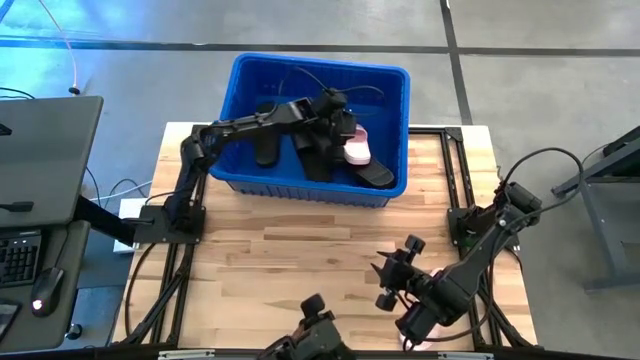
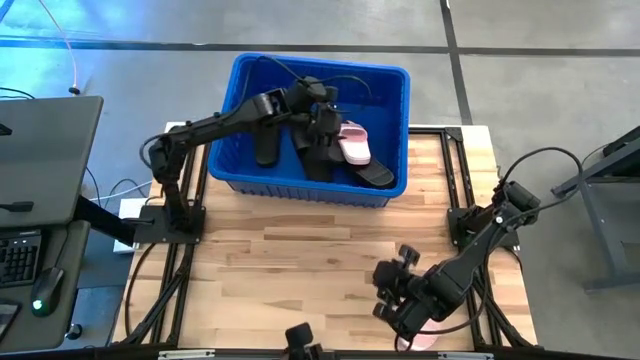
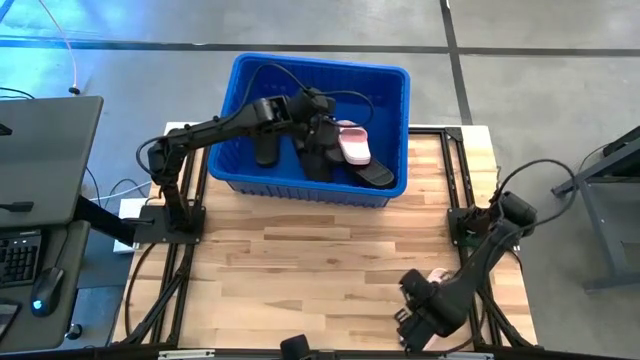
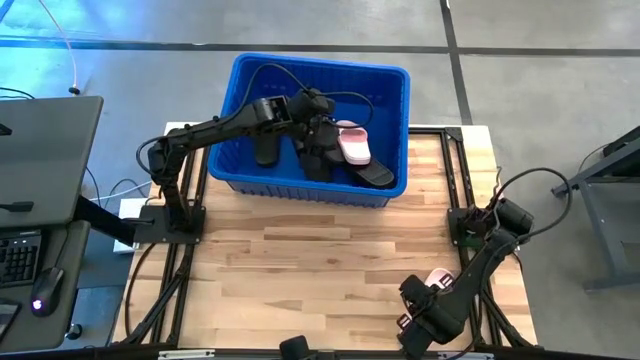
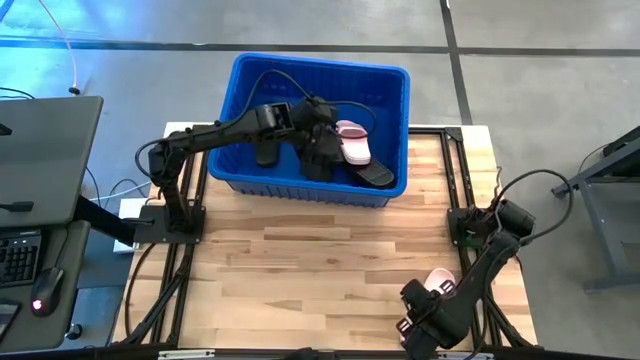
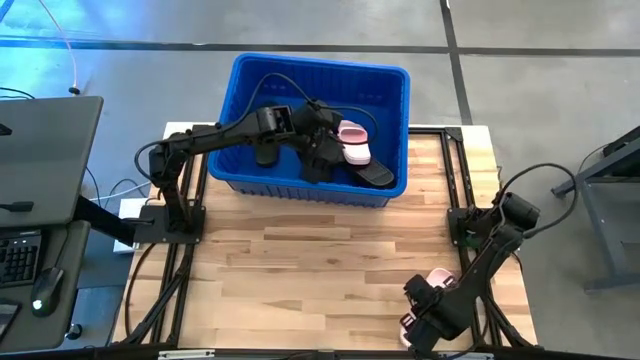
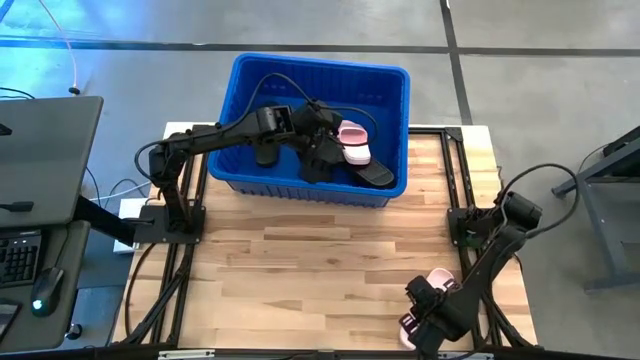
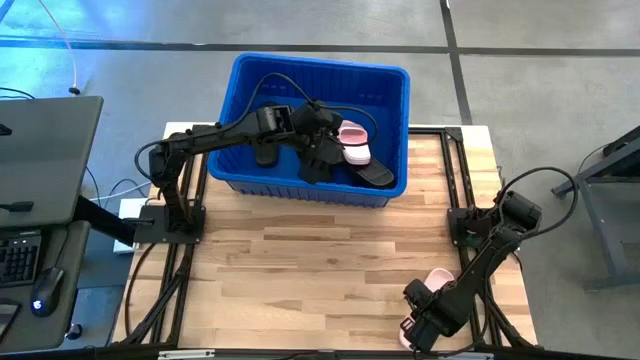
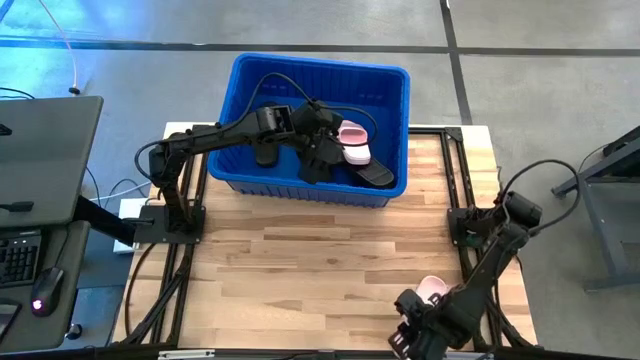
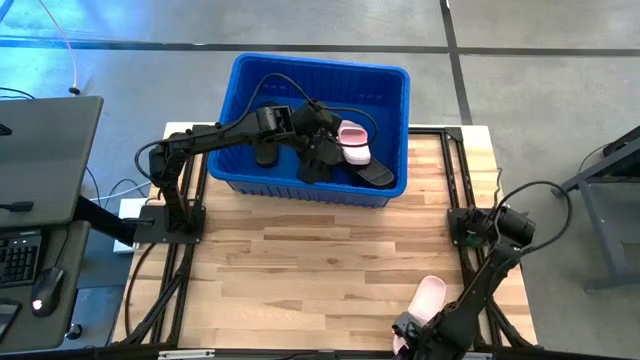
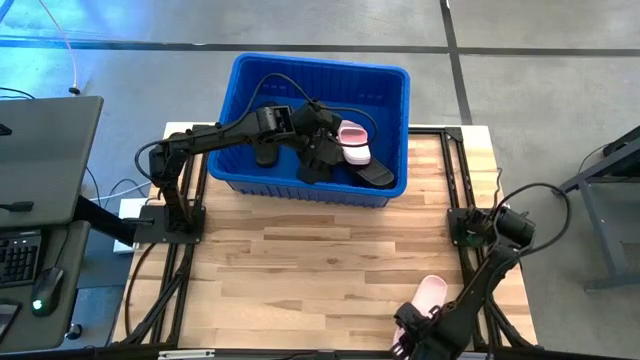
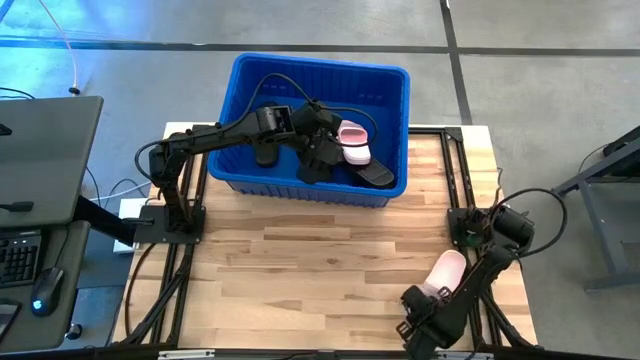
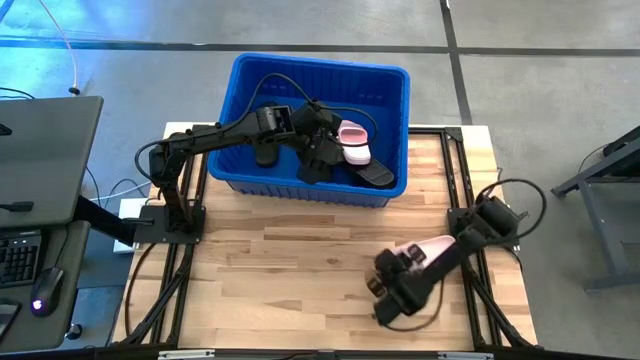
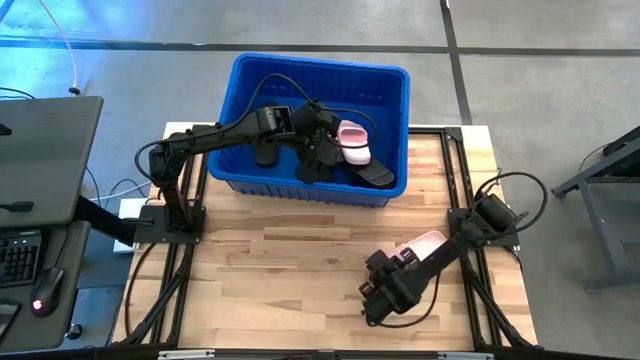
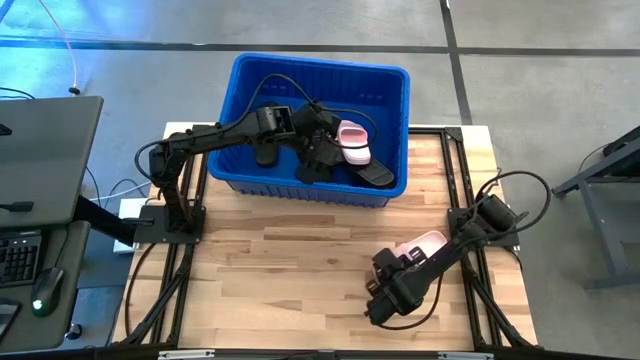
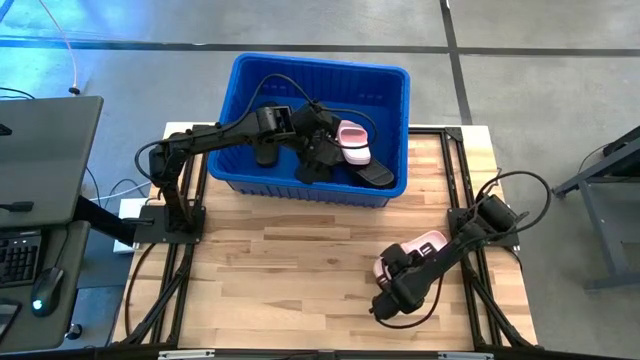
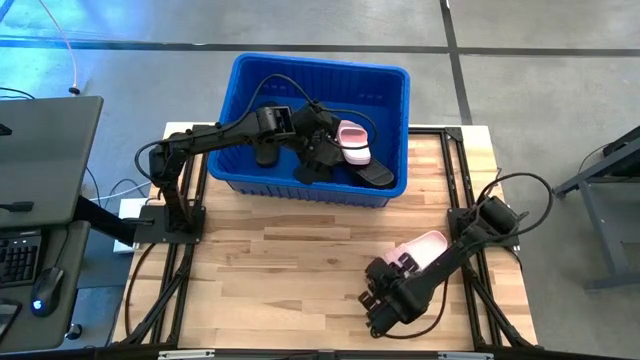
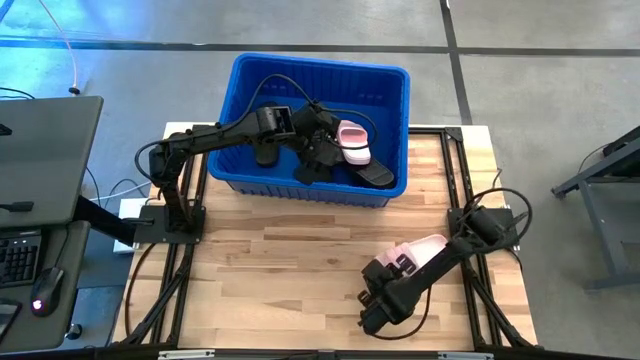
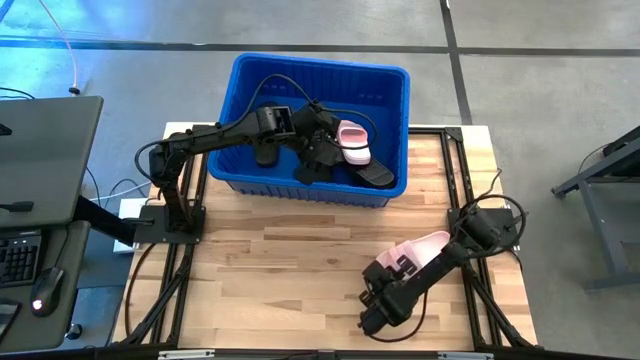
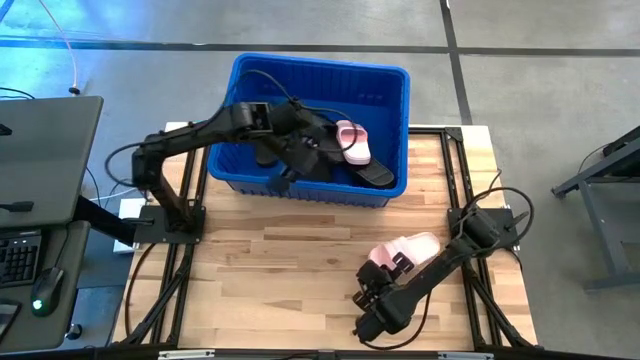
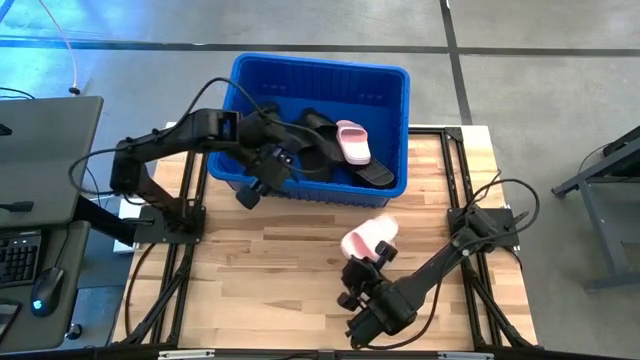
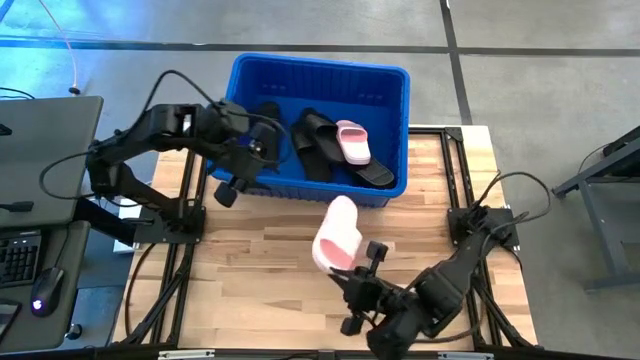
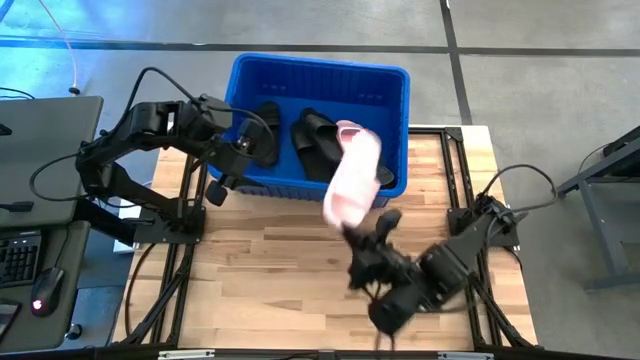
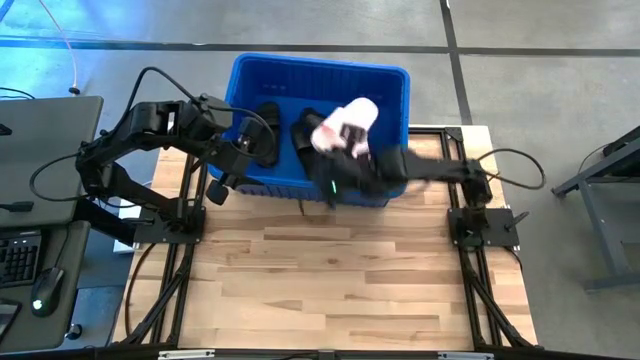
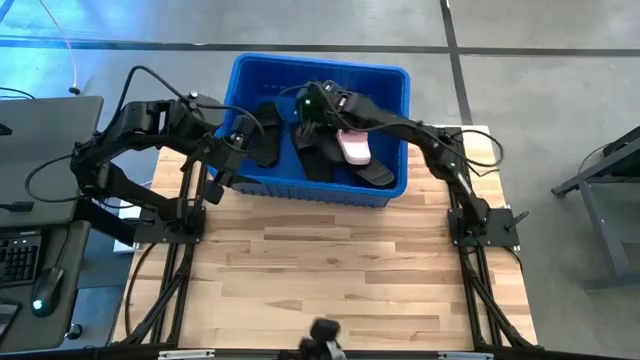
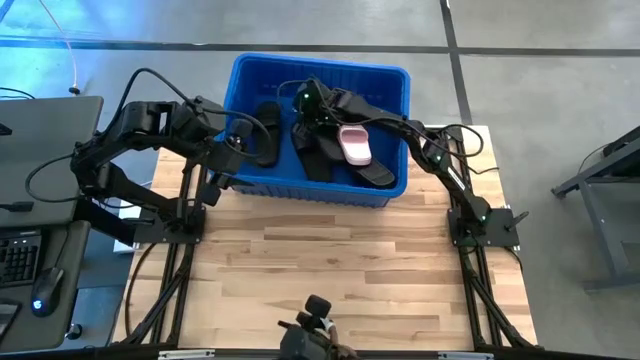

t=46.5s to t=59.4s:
Task: Pick and place slides into bin
Put the white slide into the blue bin

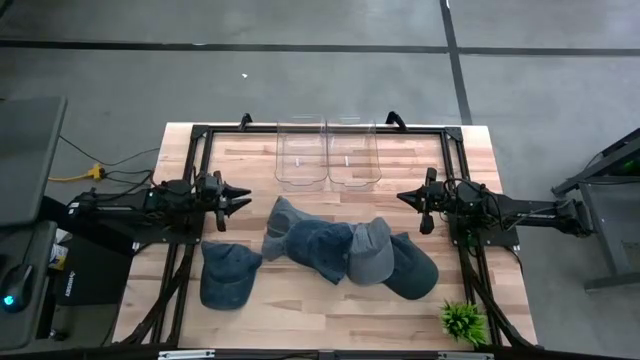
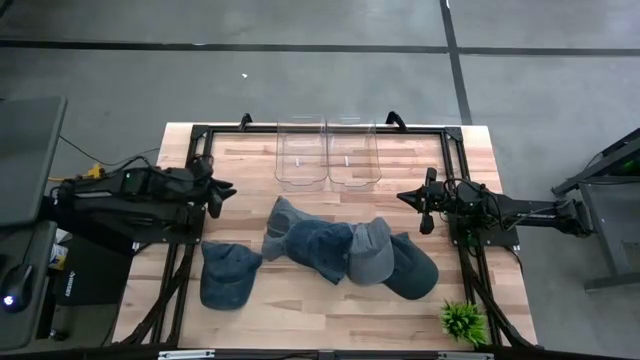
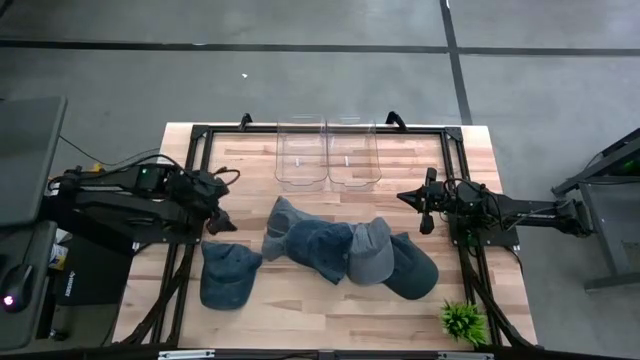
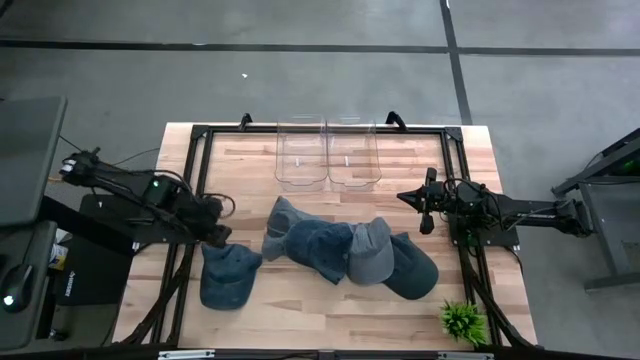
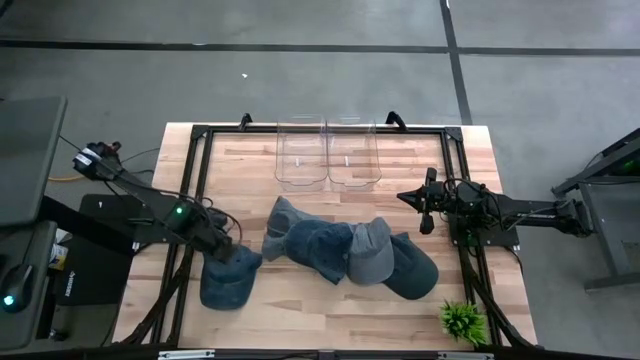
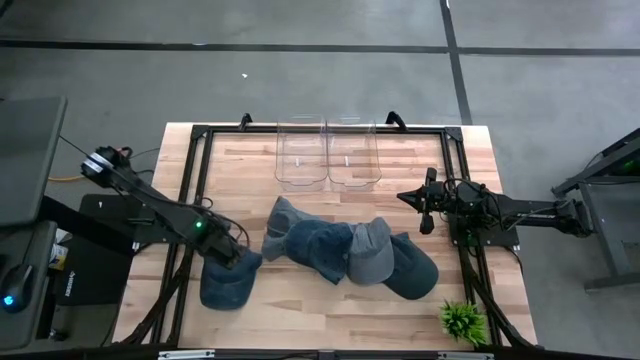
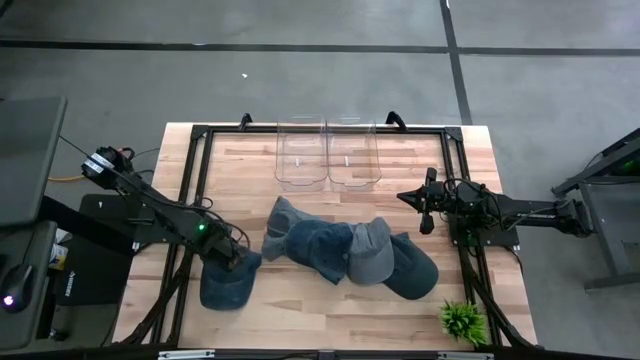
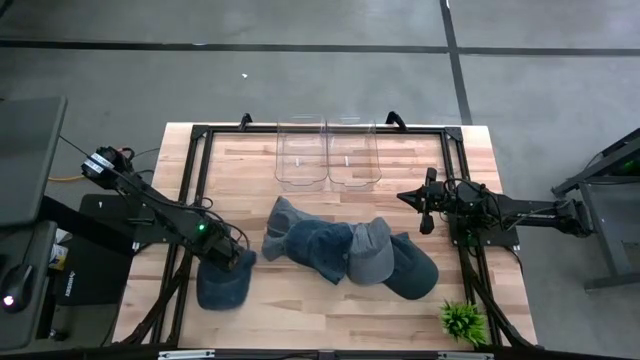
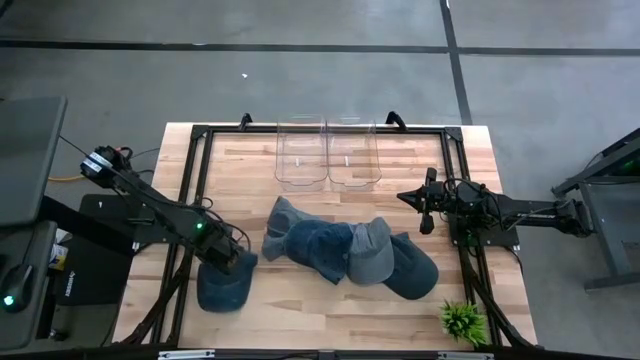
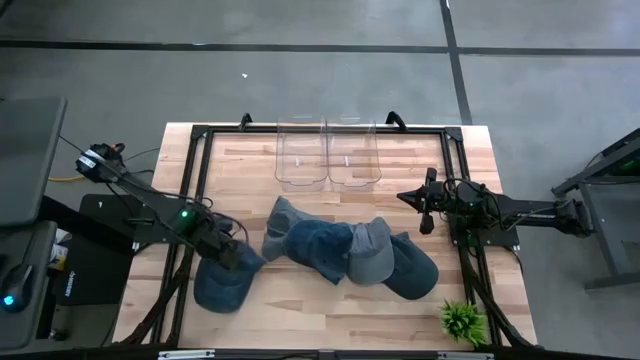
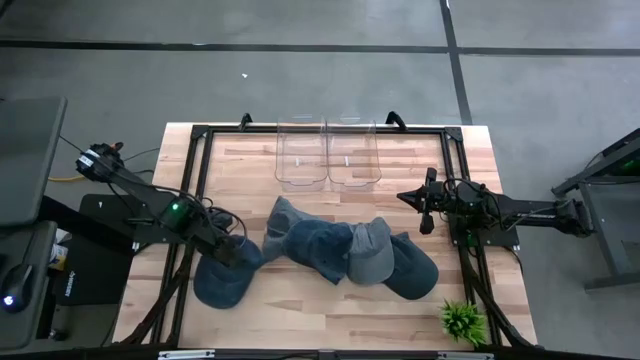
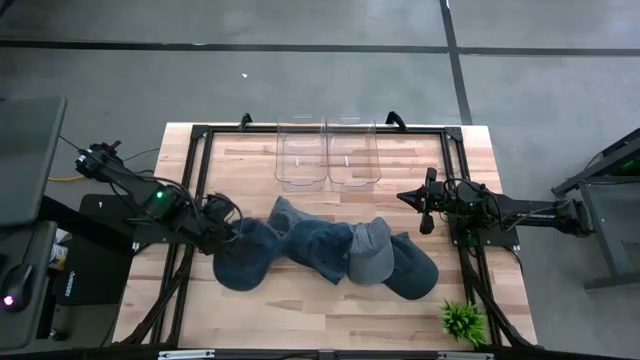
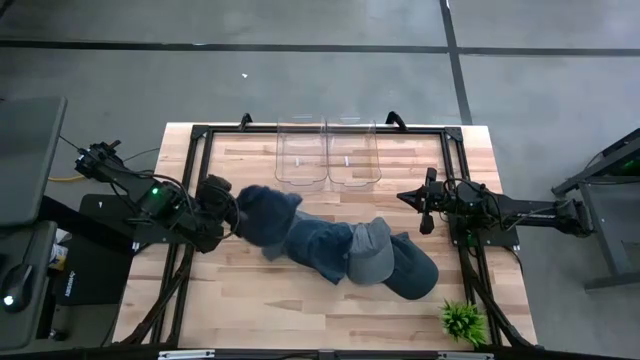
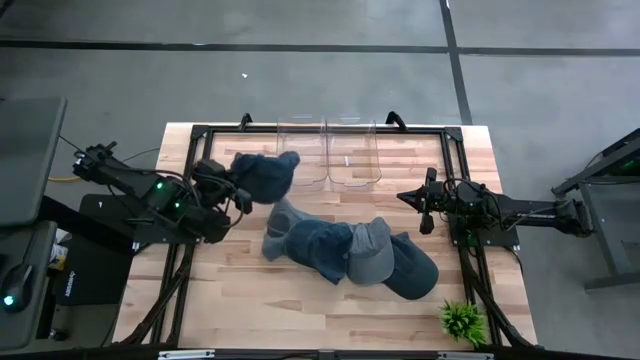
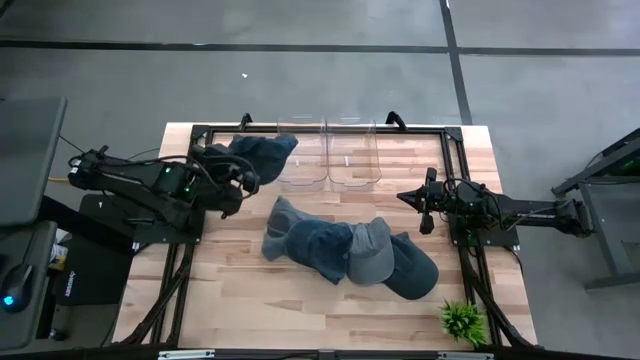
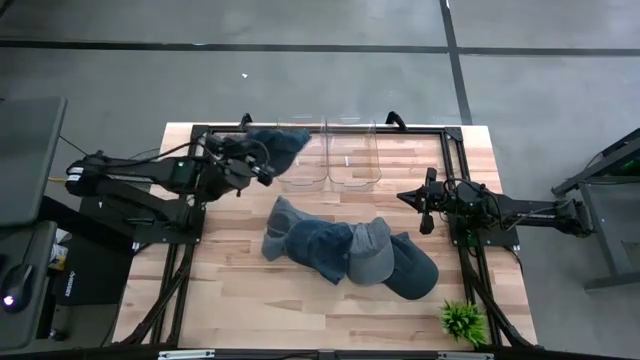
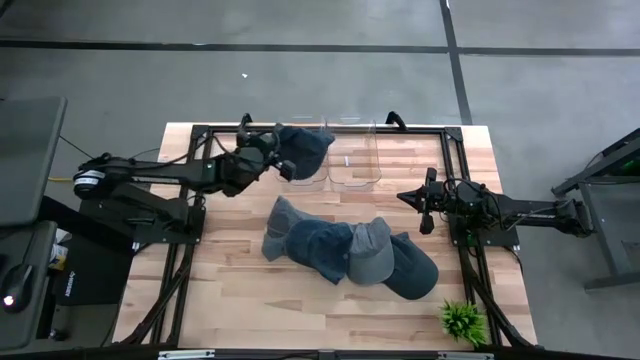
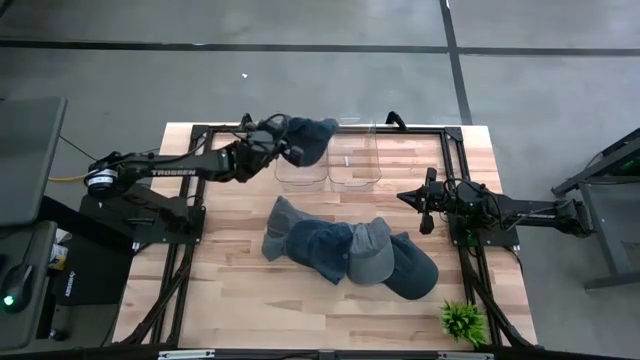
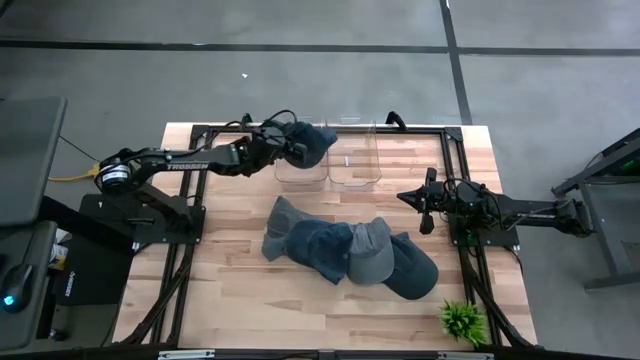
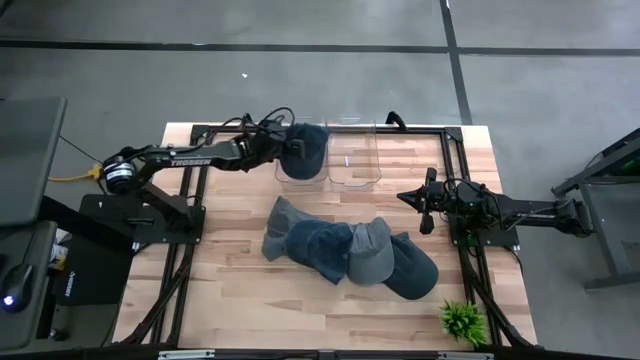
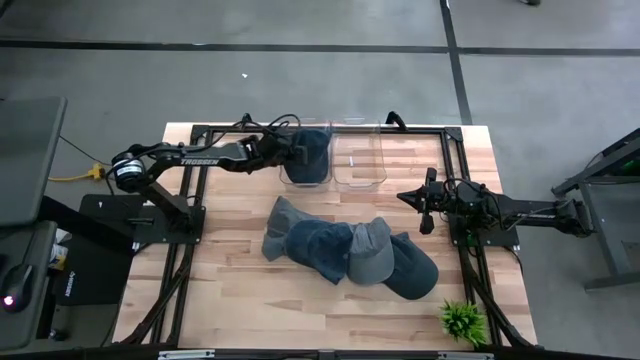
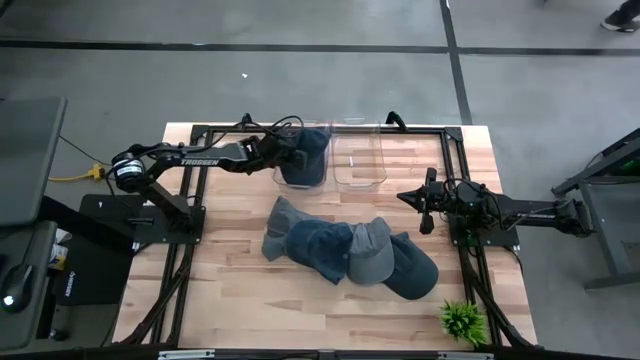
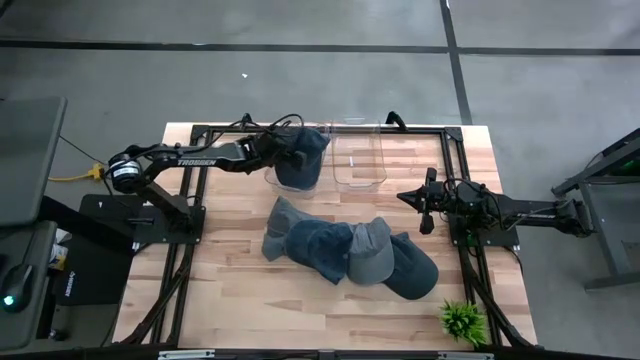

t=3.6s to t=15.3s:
Task: Pick & Place hat
Put the left blue cap into the left transparent bin
